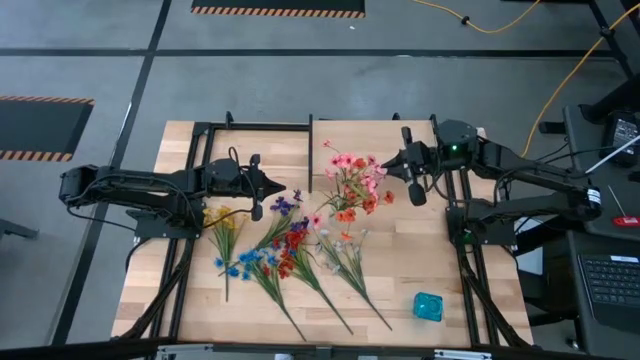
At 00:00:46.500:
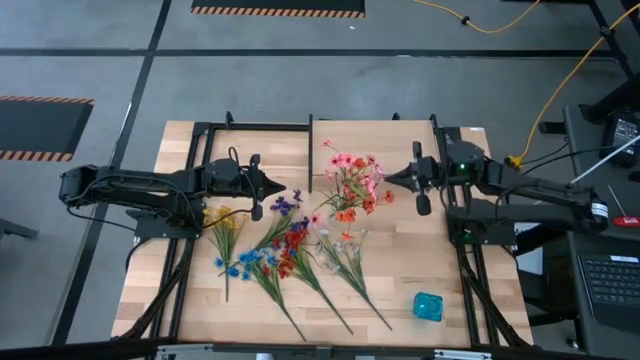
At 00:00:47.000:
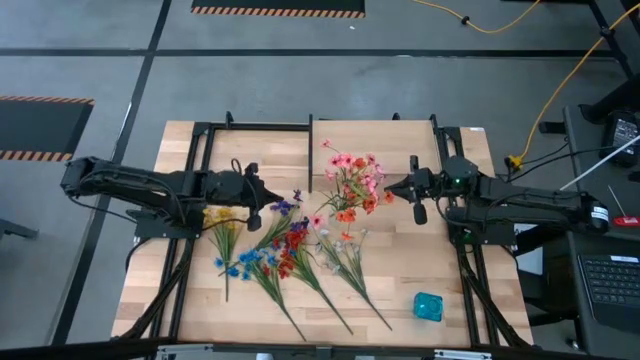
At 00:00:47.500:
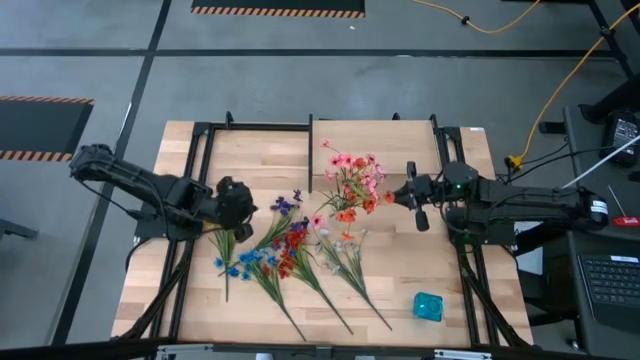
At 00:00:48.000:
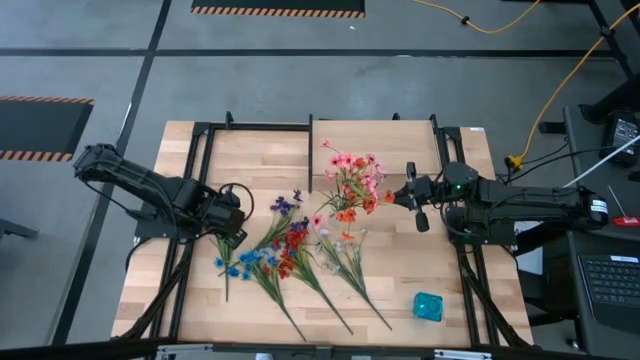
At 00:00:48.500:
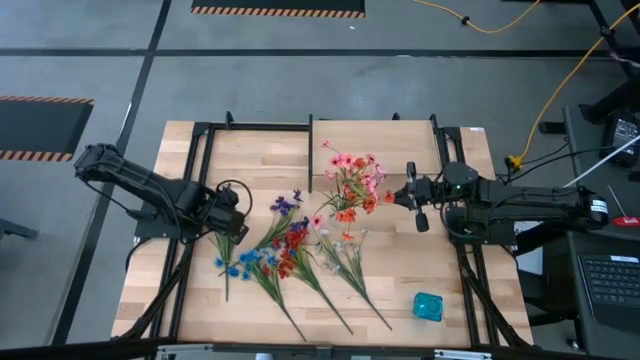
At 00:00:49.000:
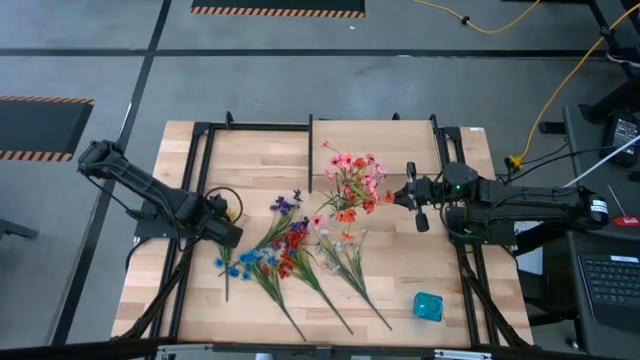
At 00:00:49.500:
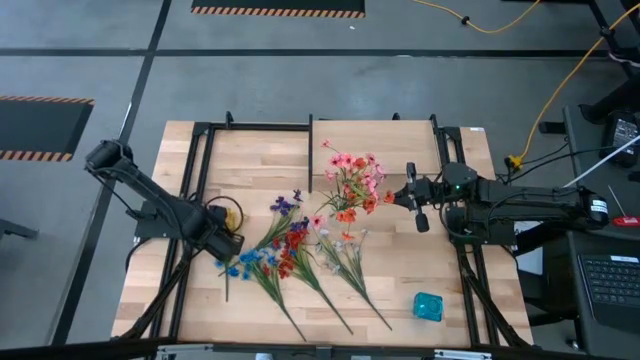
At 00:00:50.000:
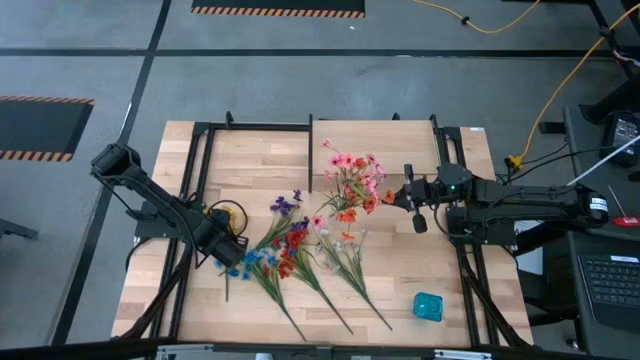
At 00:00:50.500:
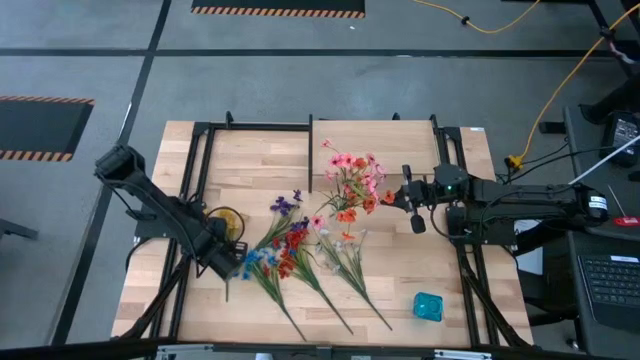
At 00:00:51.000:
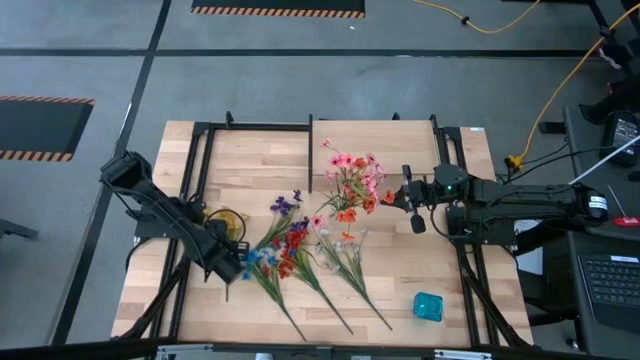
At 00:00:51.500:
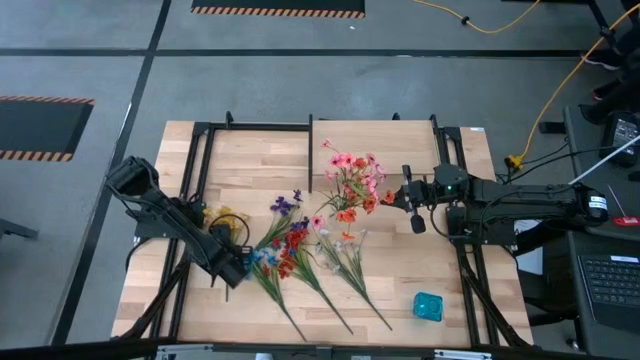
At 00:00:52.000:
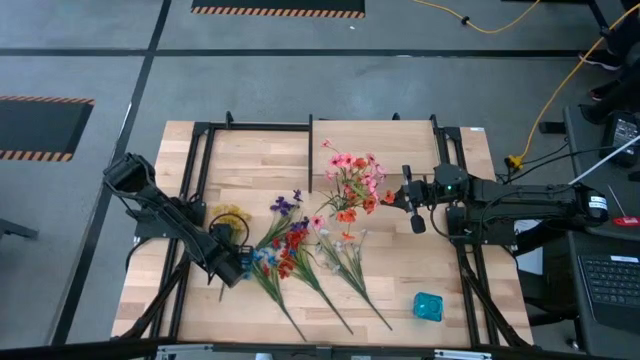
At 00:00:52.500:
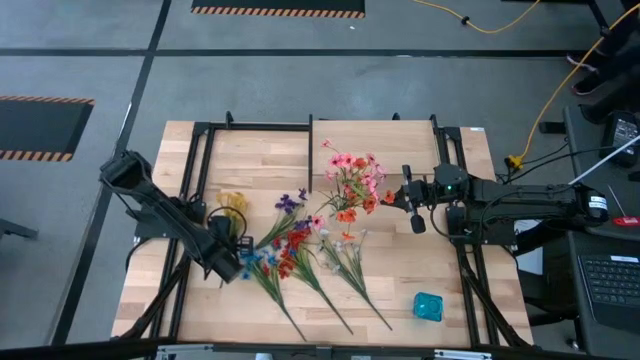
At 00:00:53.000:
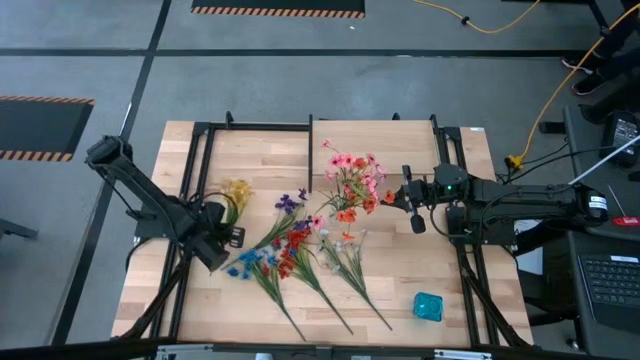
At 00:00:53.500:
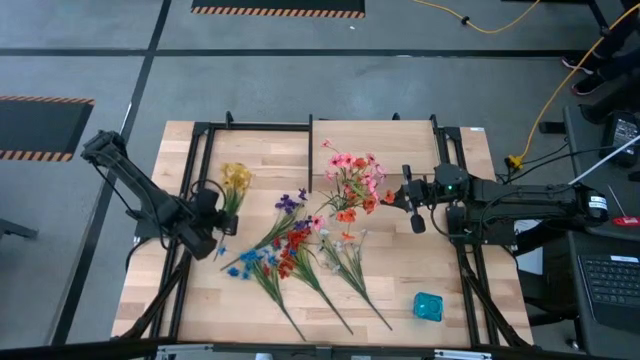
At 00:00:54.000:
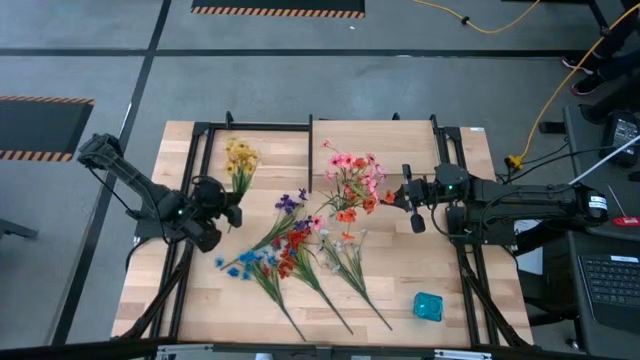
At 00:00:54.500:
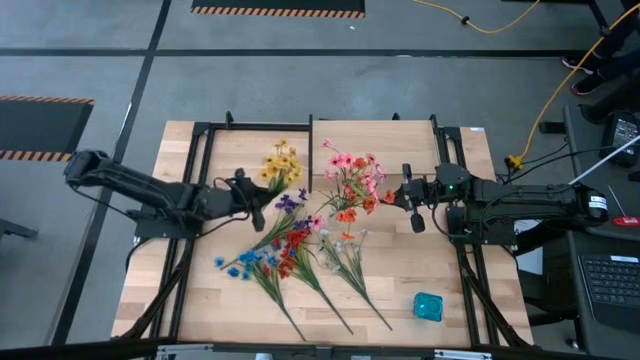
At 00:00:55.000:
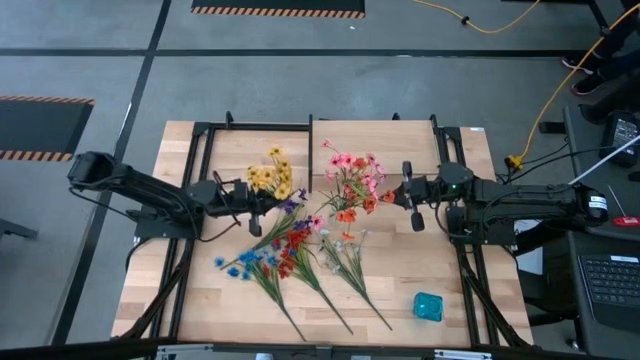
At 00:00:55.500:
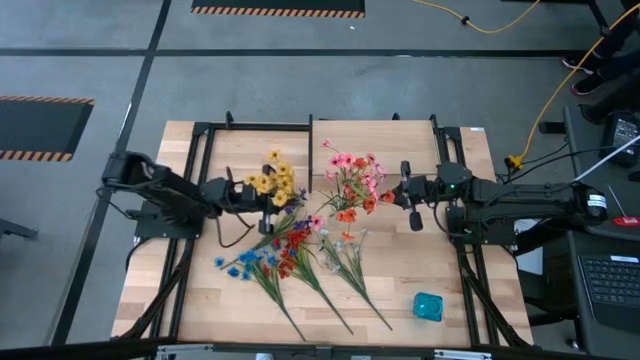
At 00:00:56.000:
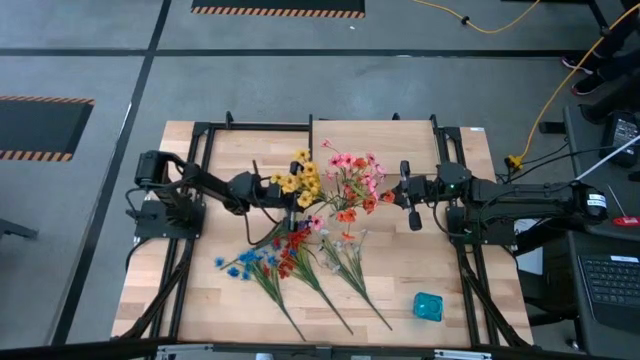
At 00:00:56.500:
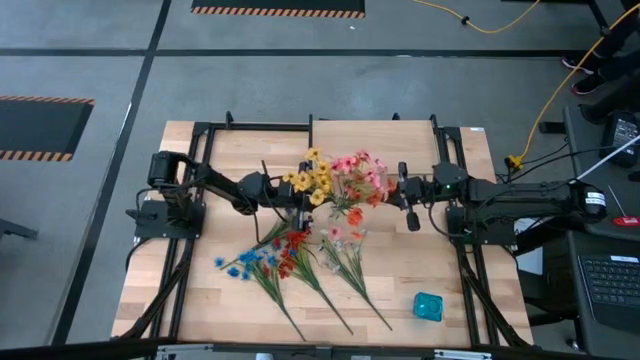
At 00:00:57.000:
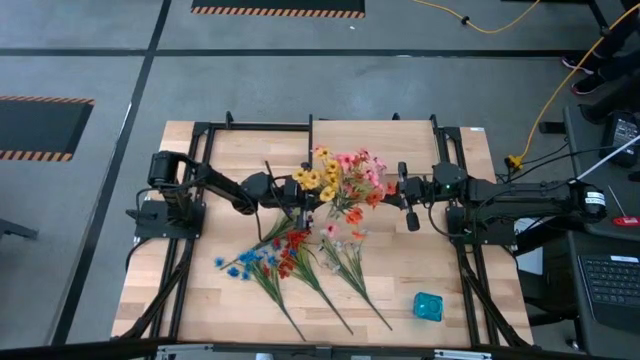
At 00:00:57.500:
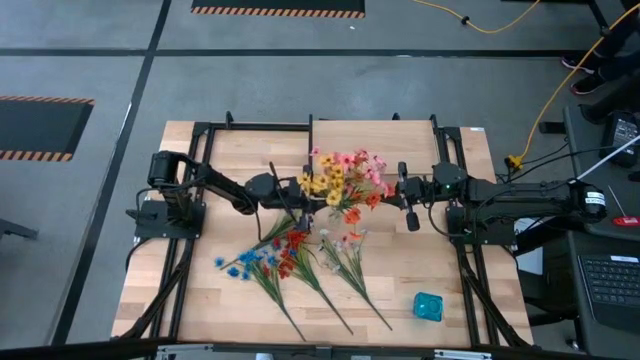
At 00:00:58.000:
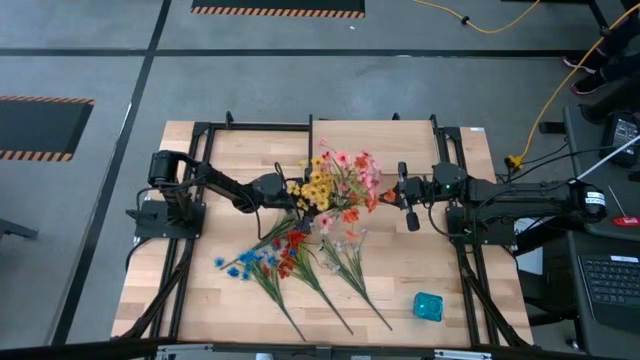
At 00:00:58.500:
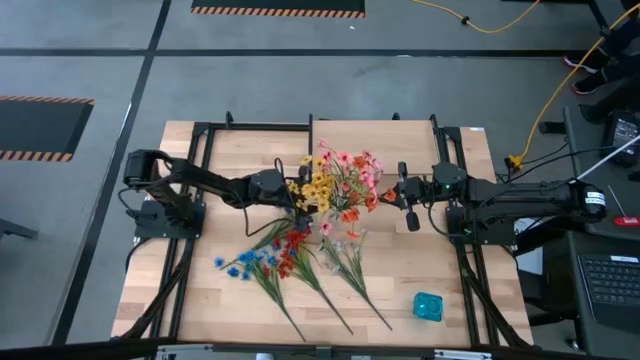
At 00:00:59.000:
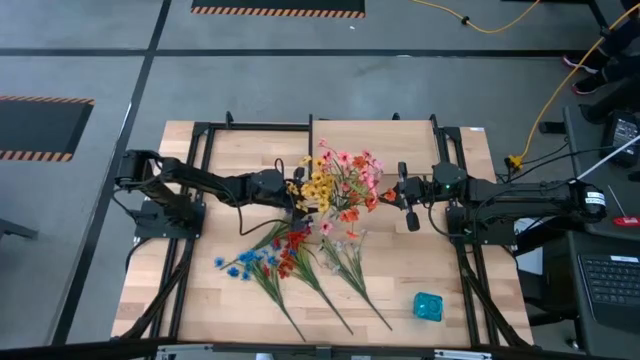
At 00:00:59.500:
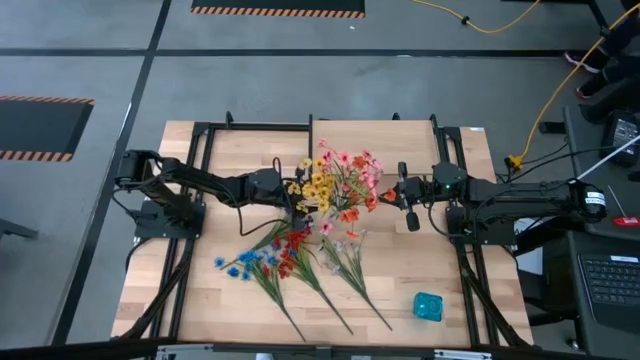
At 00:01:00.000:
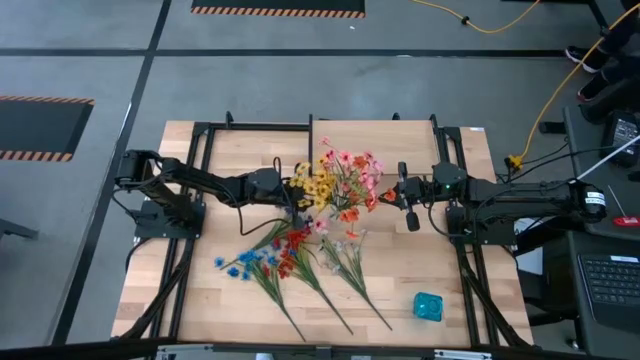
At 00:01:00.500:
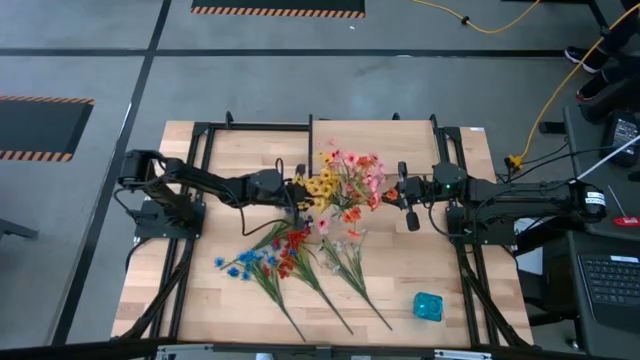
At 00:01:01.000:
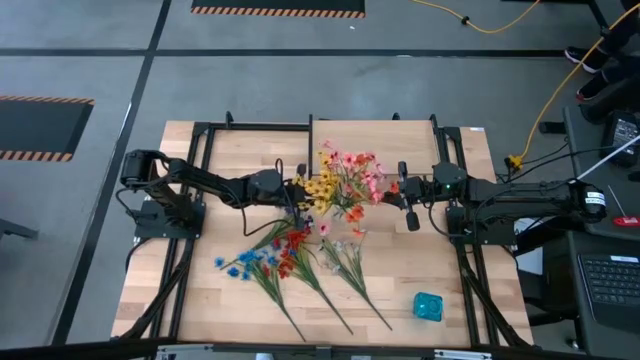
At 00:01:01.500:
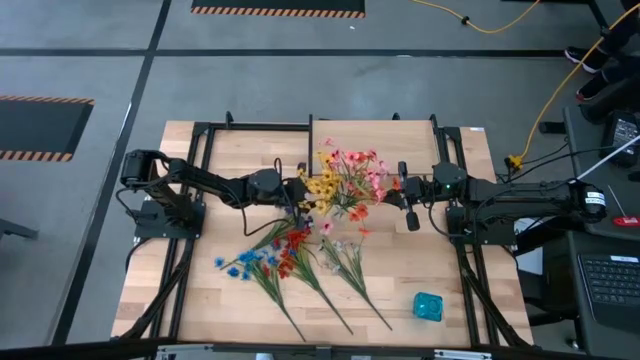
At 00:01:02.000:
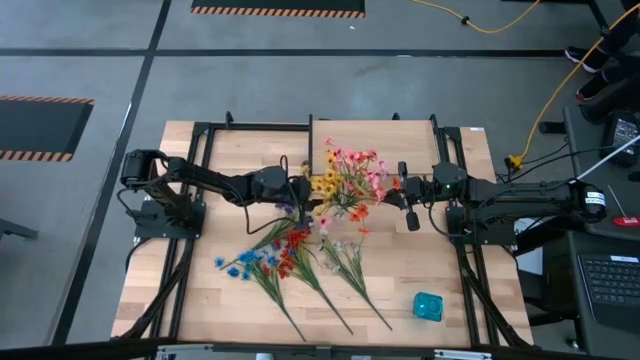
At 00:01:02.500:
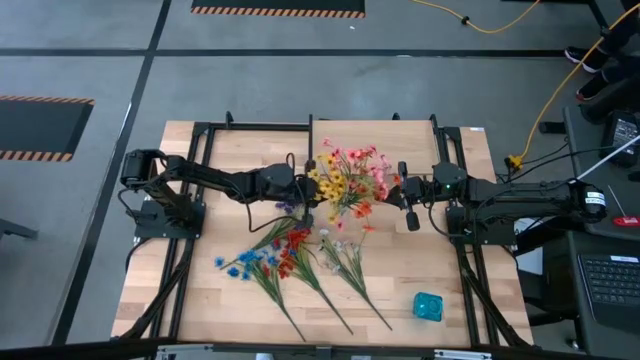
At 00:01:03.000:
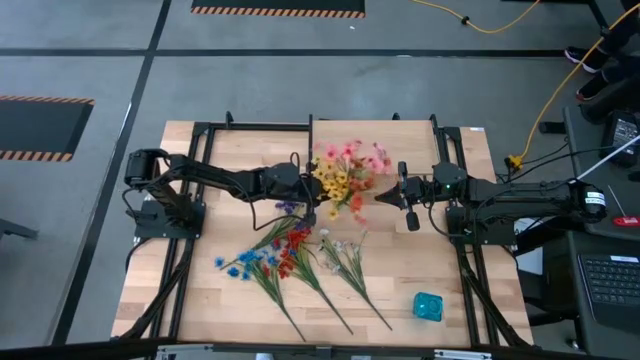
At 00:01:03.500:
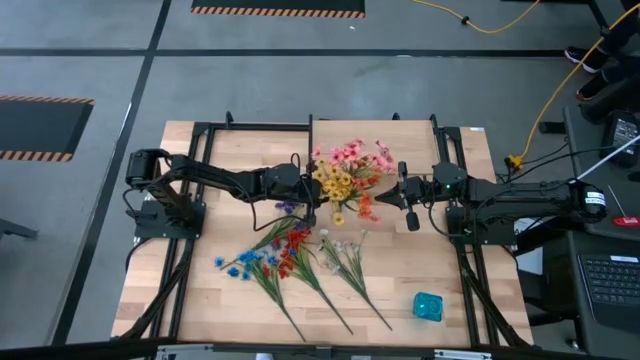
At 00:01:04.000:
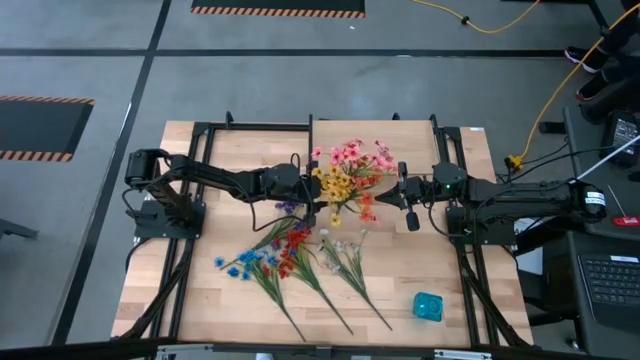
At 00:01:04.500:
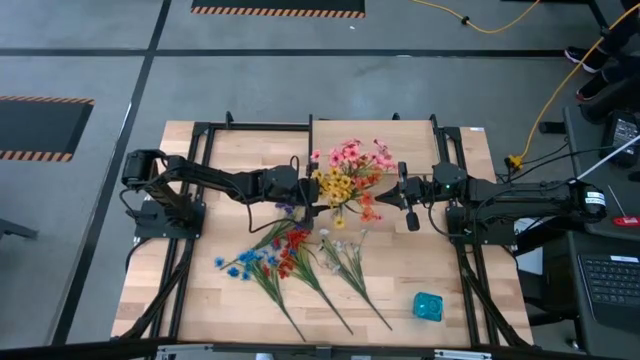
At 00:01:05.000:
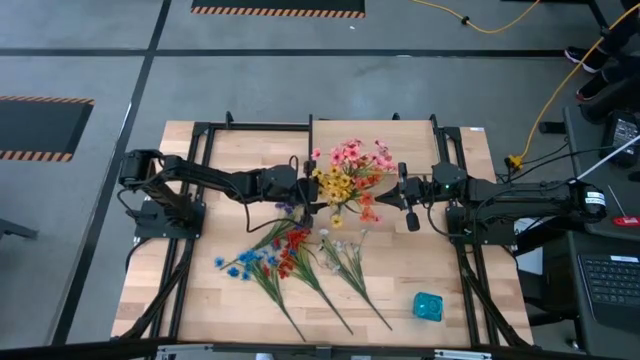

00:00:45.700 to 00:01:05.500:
Task: Pick and place flowers into a vace then onto a shelf
Put the yellow flowers into the transparent vase
